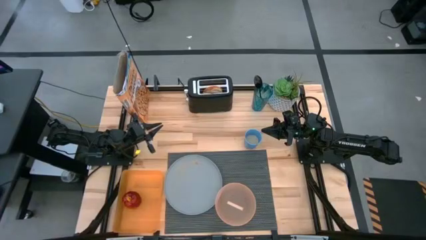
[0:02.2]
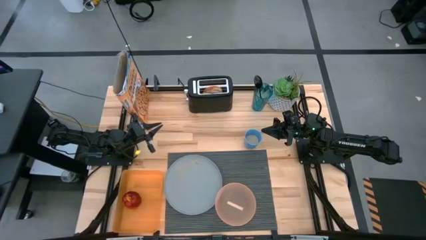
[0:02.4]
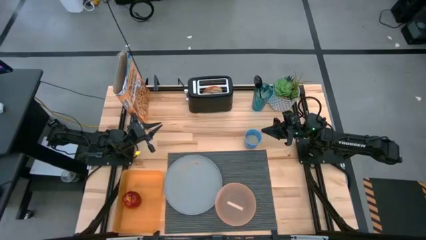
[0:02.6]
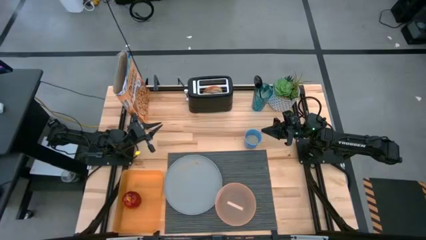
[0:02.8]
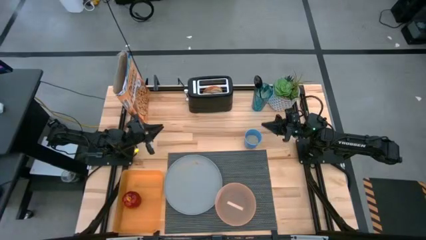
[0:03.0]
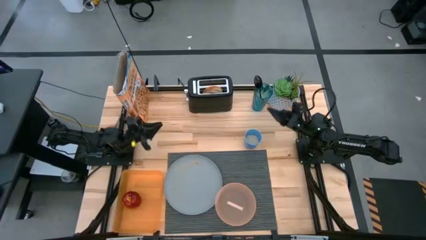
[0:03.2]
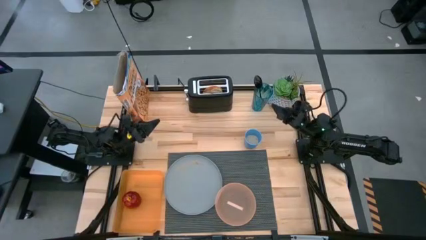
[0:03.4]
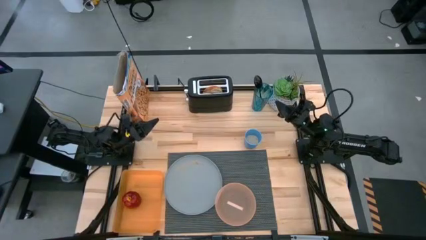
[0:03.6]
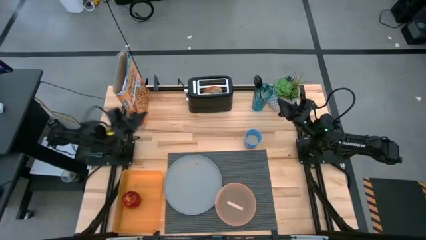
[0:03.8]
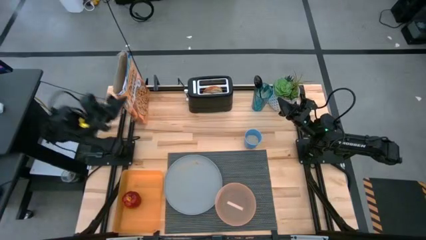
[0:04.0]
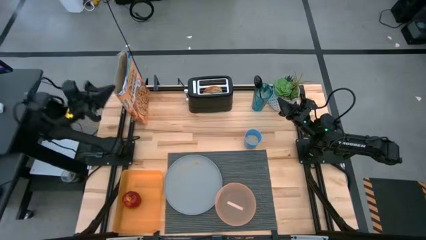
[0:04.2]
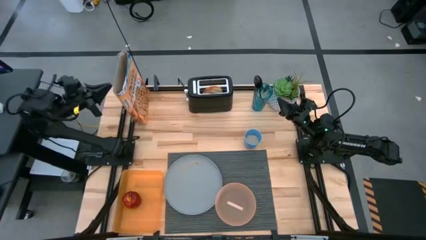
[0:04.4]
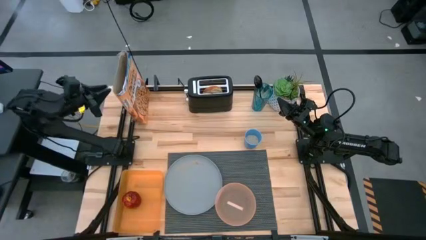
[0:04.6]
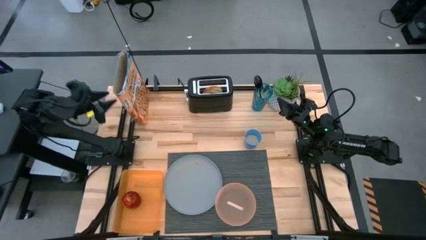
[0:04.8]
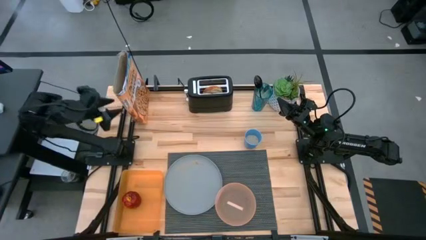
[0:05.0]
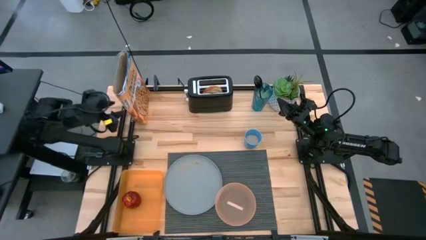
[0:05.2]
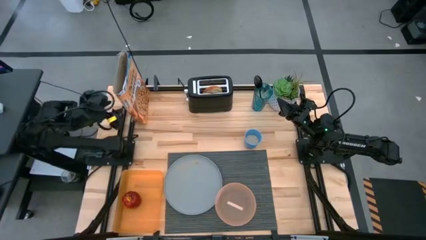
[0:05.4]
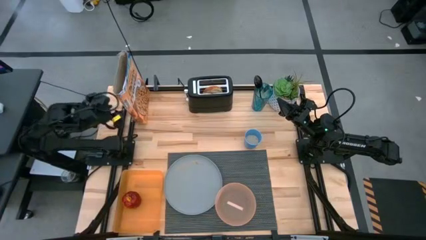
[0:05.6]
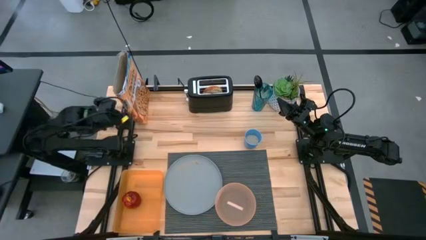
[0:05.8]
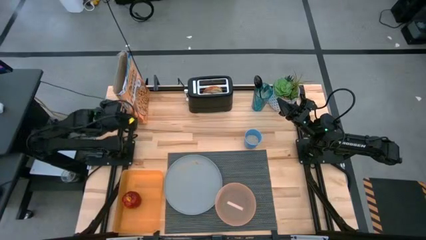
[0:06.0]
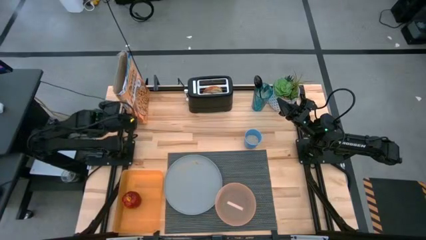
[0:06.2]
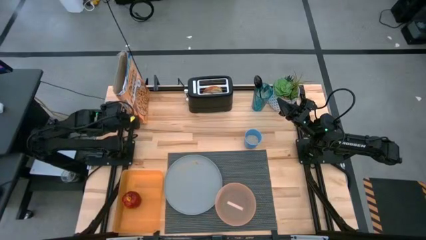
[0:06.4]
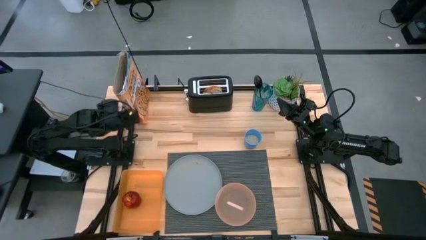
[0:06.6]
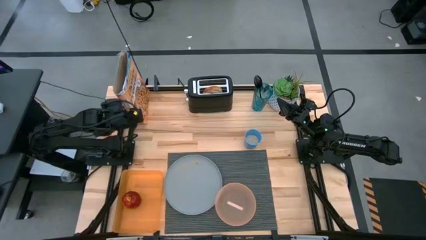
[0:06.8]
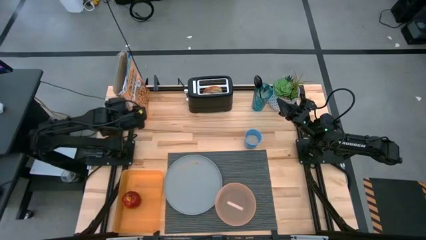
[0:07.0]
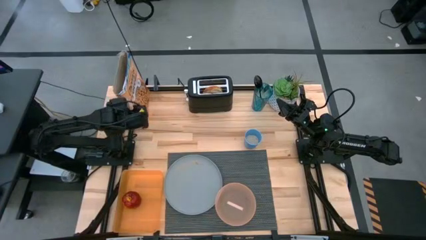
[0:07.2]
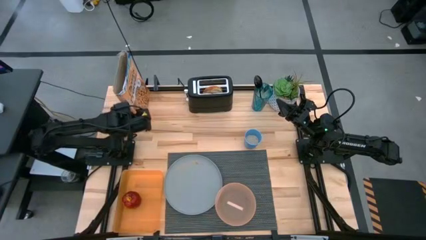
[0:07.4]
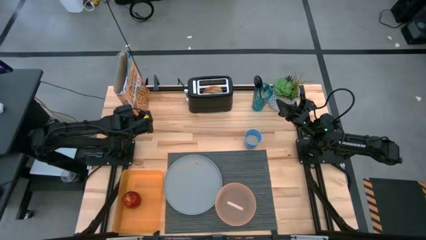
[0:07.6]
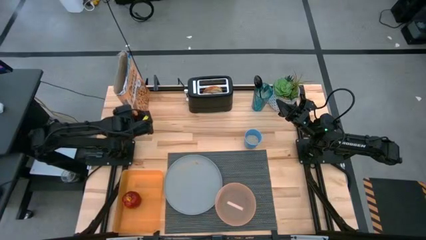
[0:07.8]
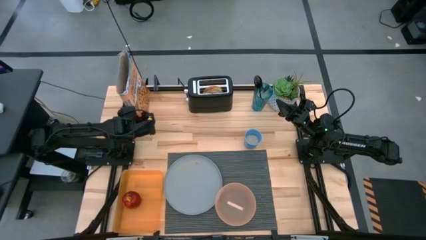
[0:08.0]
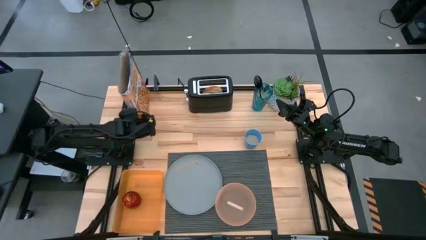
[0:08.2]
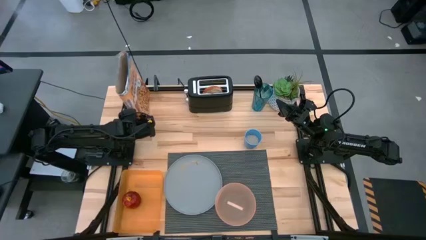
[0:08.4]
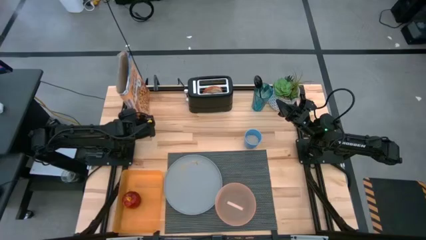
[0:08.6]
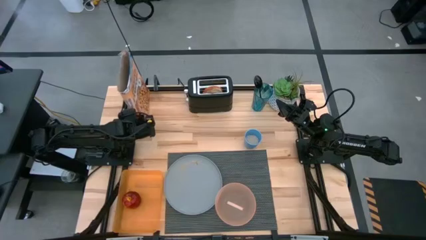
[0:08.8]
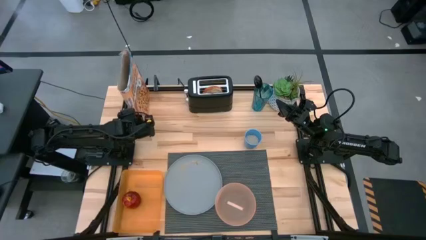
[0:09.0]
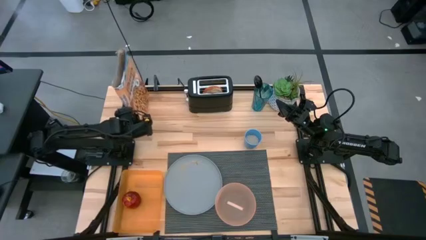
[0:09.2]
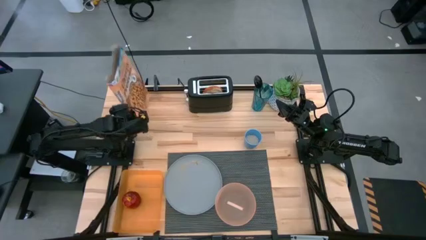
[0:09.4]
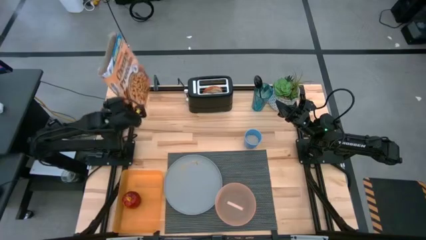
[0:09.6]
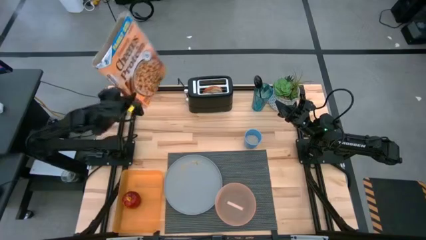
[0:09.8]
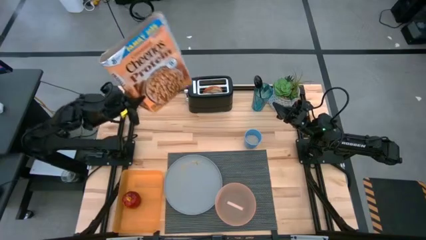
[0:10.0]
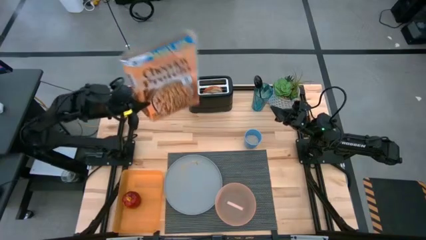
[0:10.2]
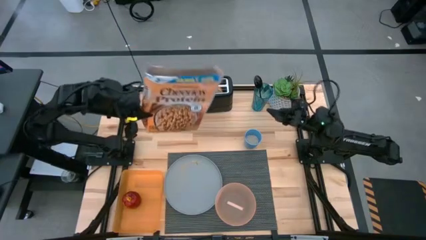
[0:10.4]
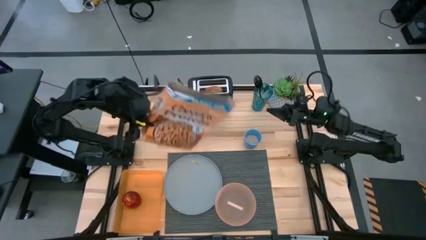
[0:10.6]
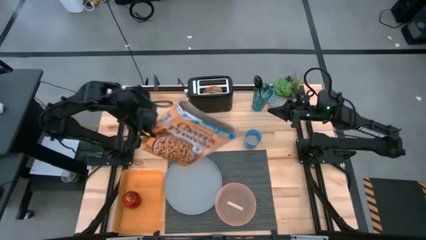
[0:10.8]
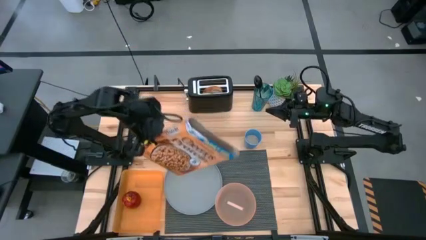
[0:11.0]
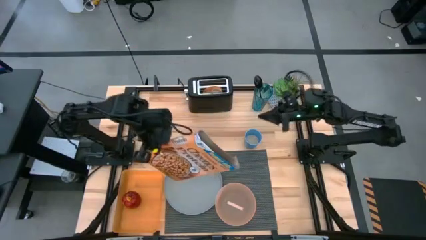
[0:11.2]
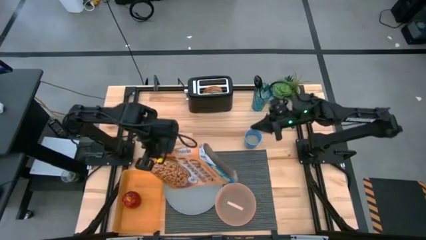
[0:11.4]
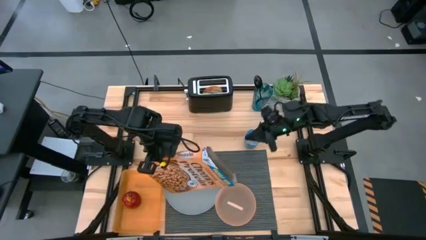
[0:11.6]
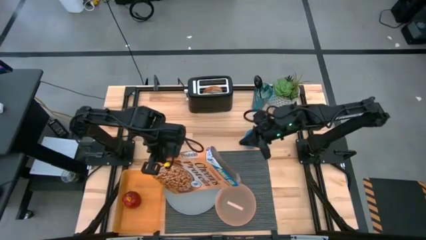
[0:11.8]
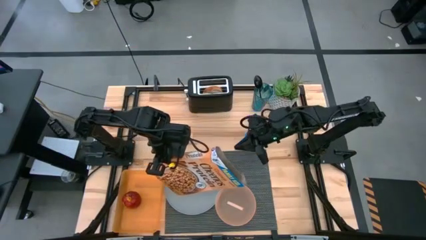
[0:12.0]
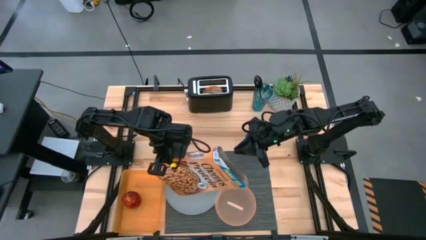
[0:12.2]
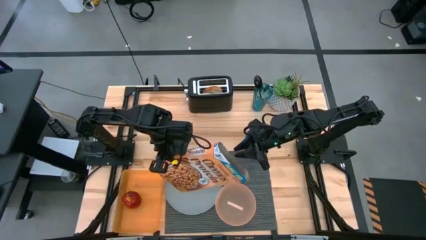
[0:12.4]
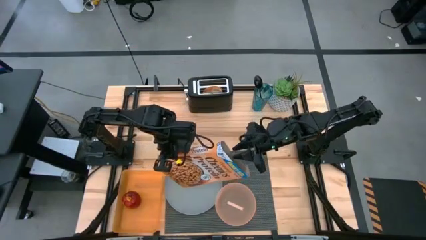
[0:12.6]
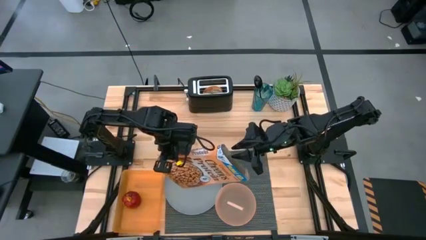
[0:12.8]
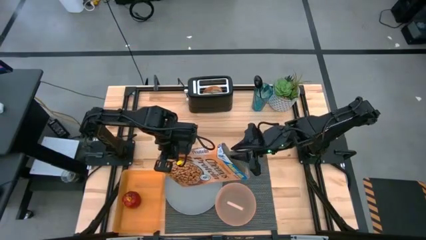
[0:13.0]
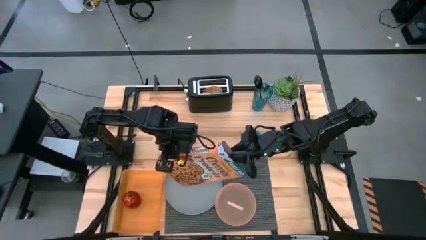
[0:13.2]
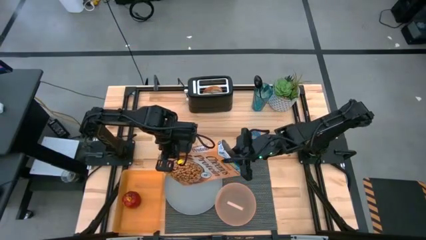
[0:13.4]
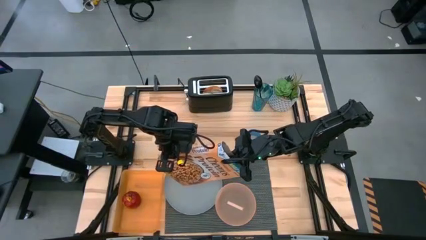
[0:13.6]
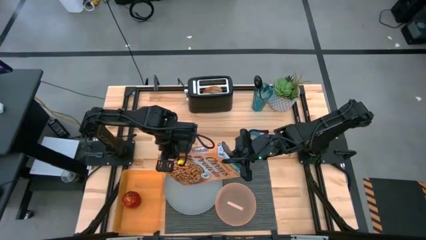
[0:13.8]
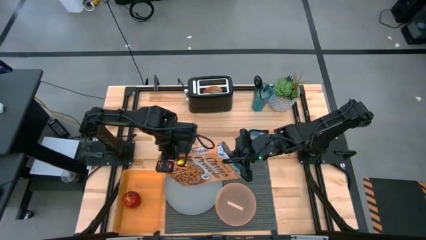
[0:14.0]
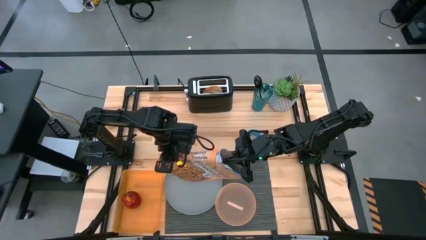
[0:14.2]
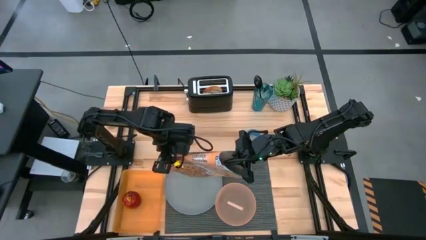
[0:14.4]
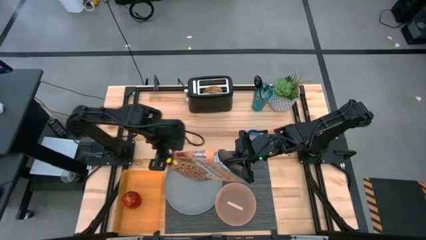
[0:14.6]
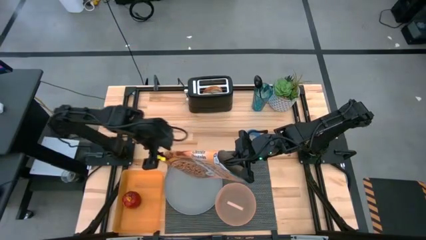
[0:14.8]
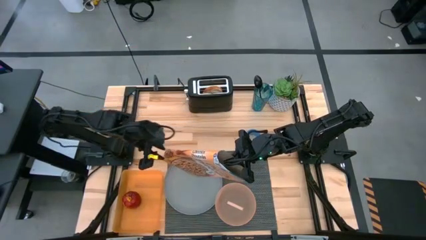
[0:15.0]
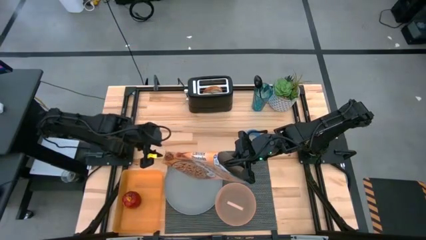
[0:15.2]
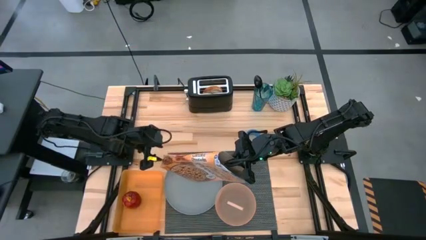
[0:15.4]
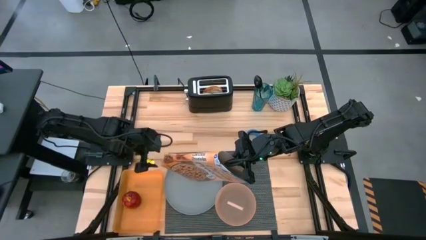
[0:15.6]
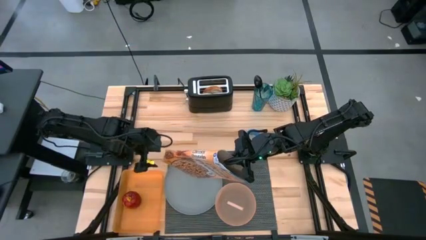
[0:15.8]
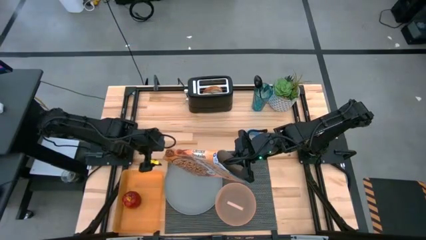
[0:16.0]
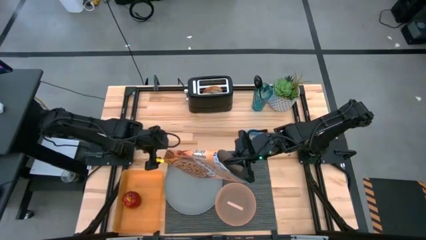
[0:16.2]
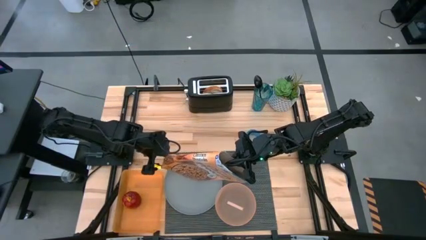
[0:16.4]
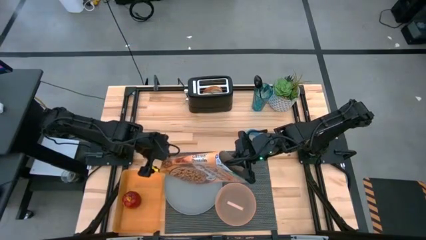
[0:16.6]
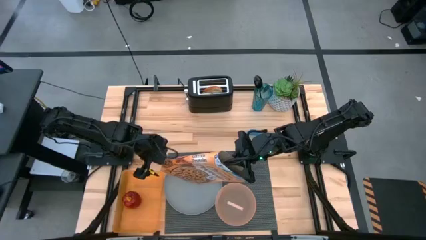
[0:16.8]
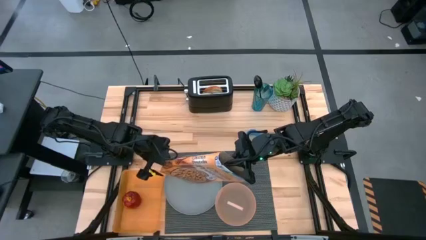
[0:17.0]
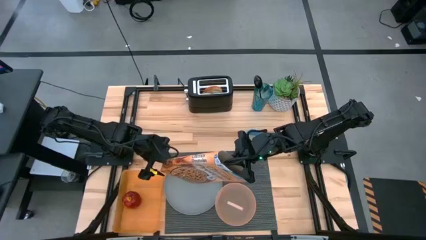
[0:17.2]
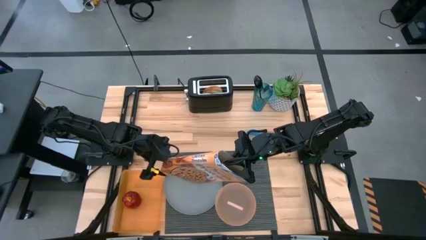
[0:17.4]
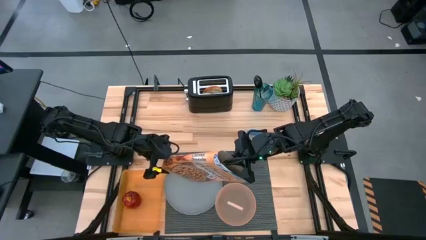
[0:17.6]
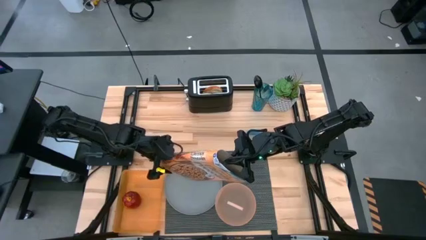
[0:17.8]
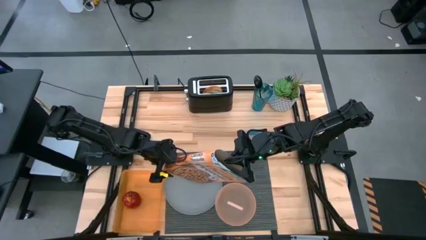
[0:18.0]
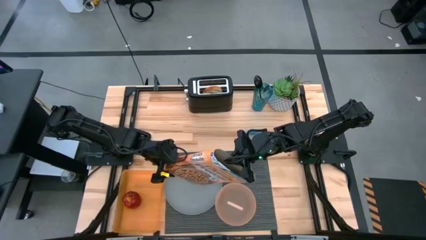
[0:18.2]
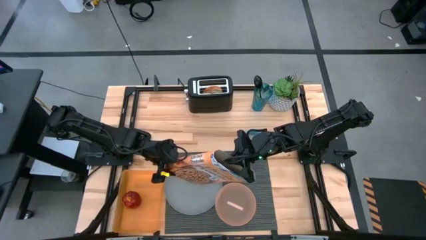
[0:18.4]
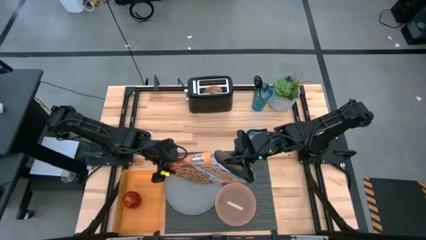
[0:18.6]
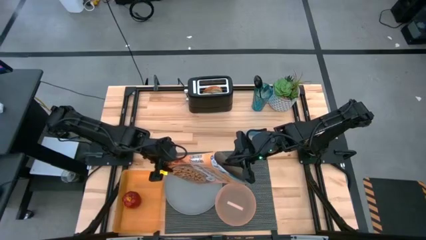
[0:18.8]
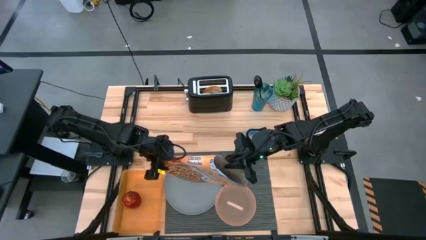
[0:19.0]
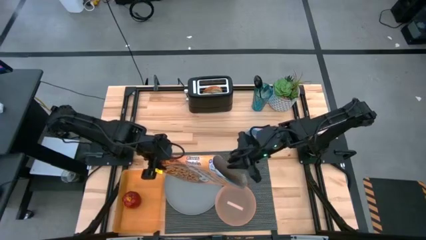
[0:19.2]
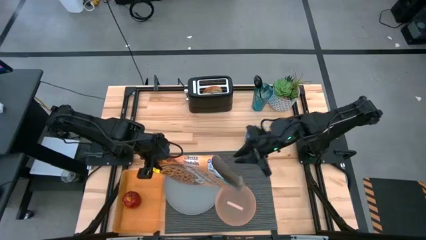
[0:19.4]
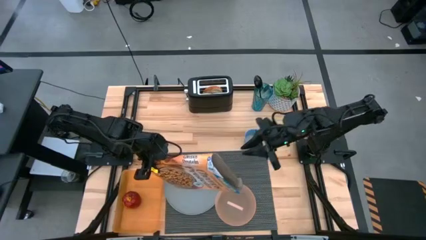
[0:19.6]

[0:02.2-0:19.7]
Task: Arrange a breakfast setting
Pour the cereal from the cereal box into the orange bowl
